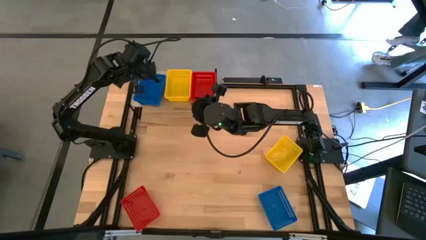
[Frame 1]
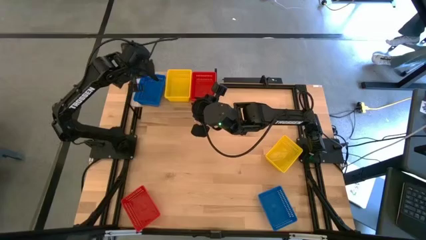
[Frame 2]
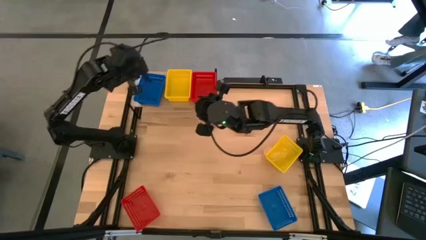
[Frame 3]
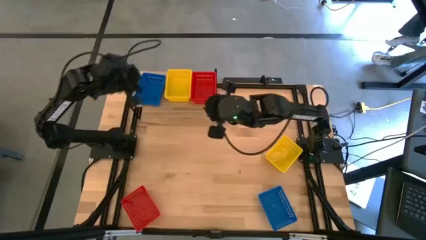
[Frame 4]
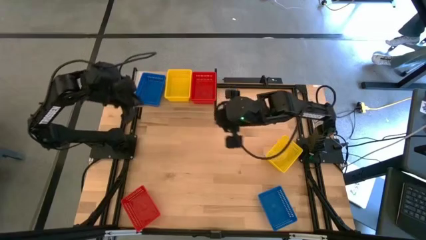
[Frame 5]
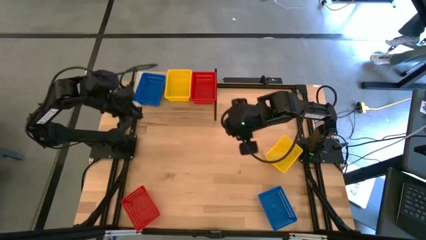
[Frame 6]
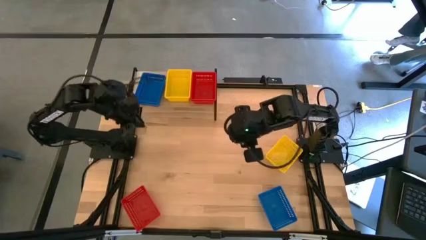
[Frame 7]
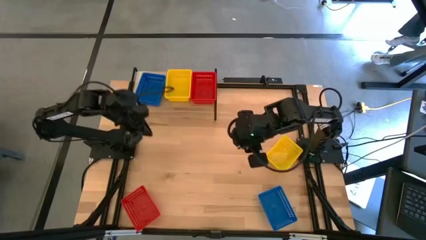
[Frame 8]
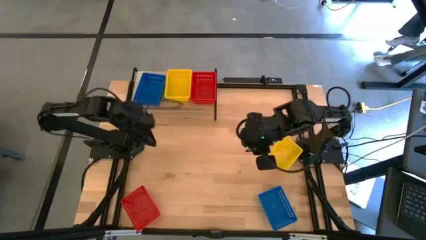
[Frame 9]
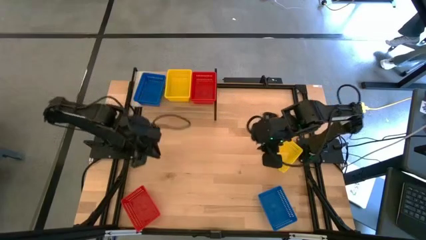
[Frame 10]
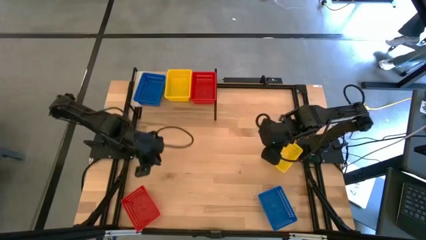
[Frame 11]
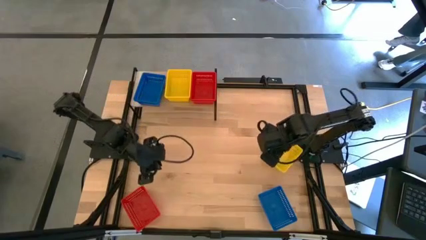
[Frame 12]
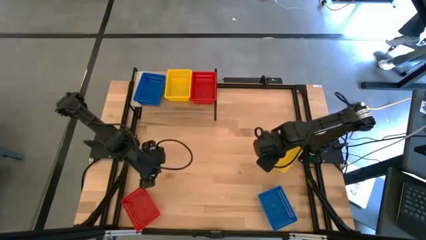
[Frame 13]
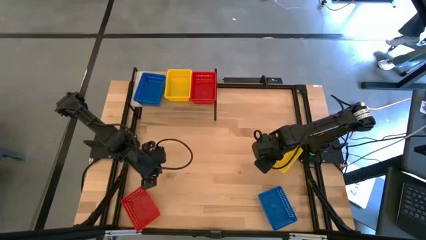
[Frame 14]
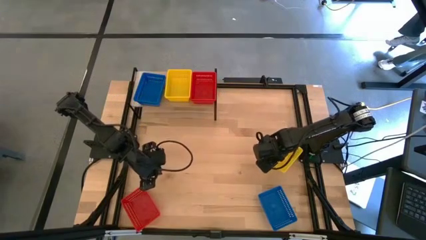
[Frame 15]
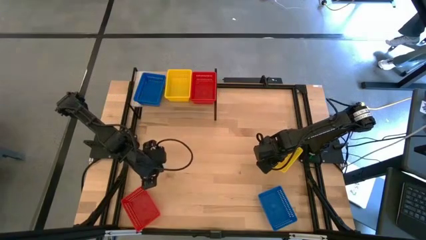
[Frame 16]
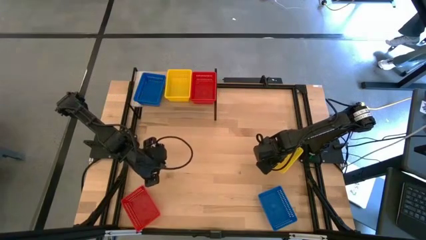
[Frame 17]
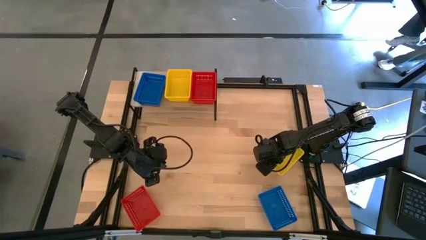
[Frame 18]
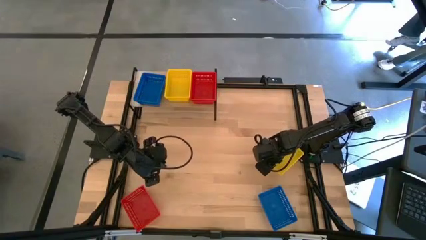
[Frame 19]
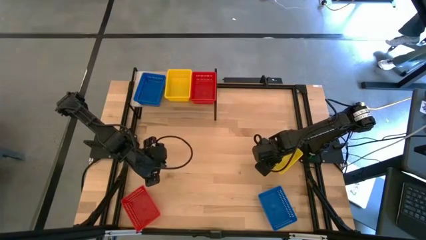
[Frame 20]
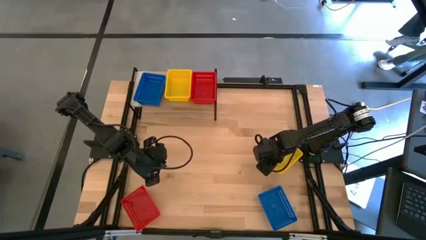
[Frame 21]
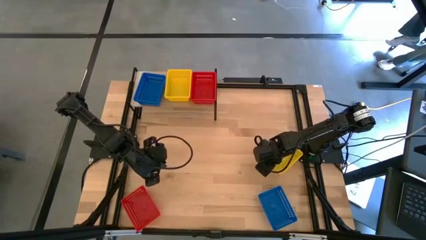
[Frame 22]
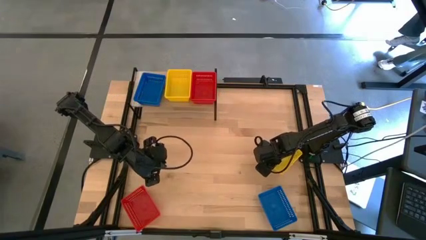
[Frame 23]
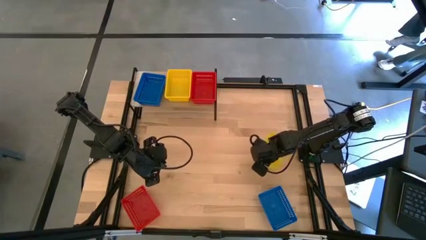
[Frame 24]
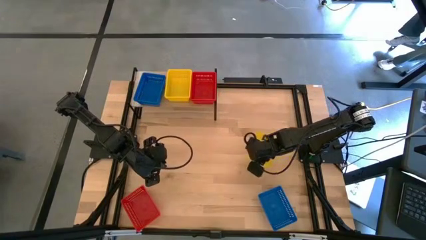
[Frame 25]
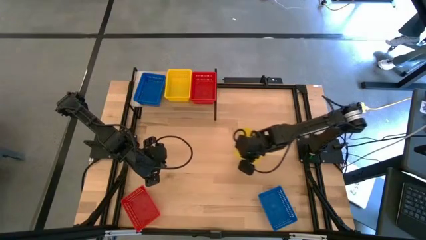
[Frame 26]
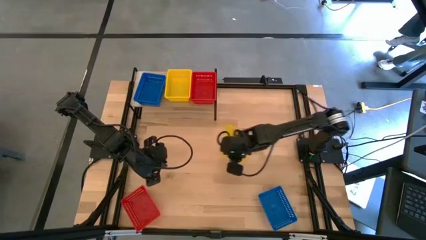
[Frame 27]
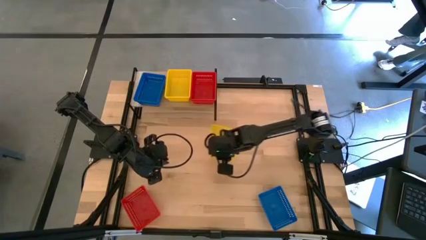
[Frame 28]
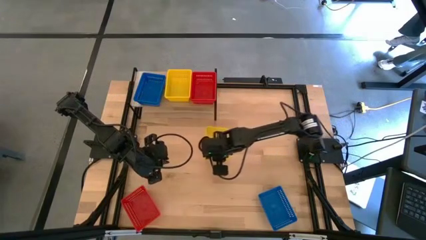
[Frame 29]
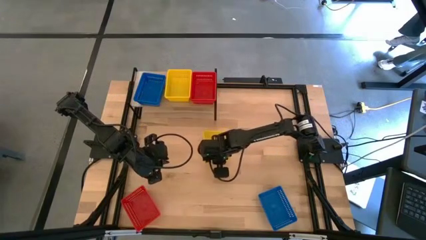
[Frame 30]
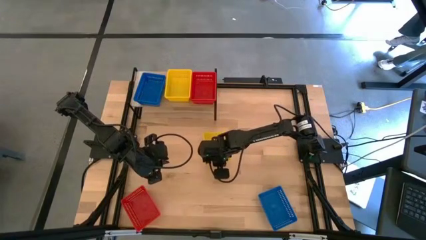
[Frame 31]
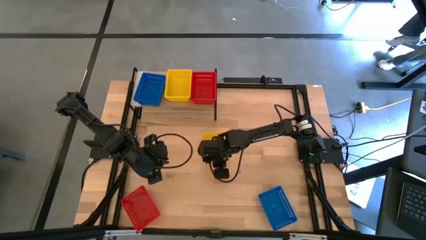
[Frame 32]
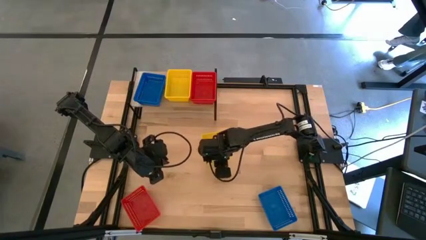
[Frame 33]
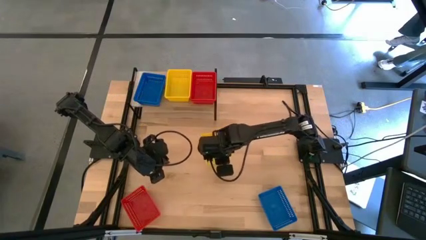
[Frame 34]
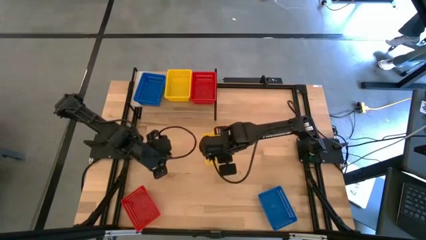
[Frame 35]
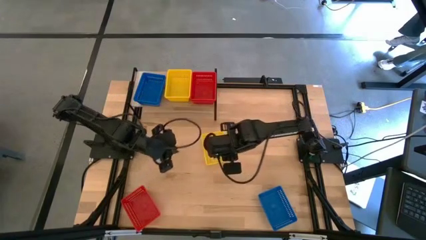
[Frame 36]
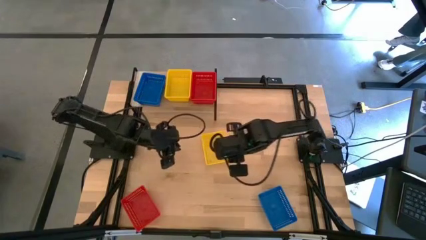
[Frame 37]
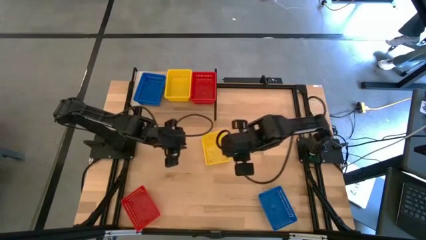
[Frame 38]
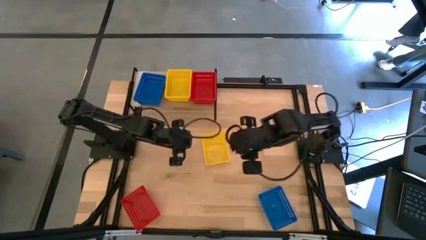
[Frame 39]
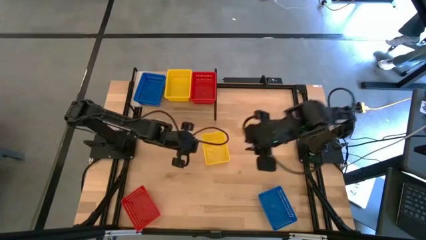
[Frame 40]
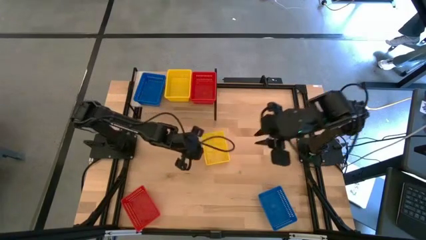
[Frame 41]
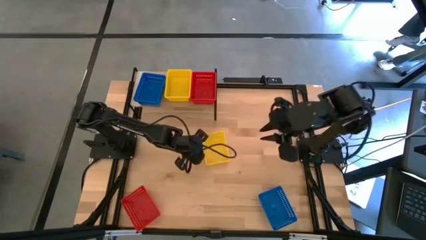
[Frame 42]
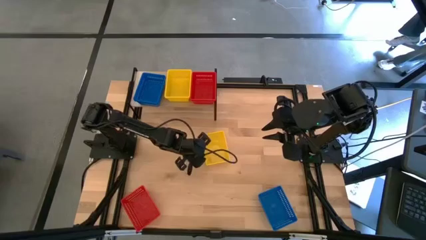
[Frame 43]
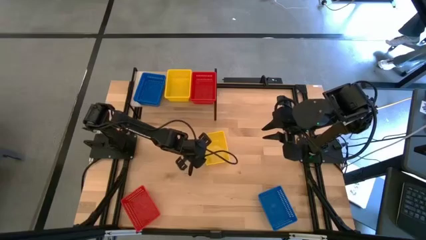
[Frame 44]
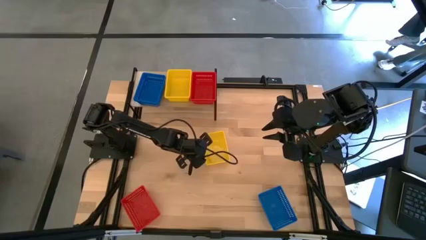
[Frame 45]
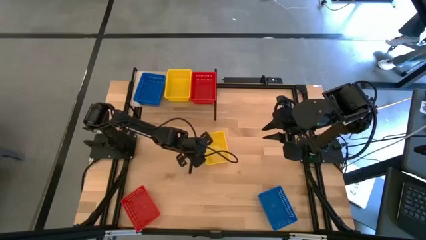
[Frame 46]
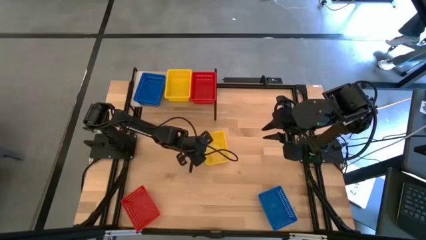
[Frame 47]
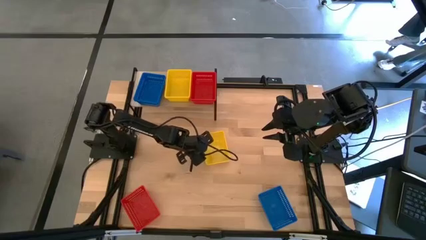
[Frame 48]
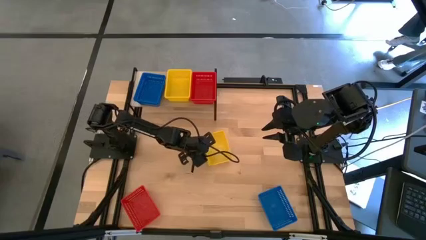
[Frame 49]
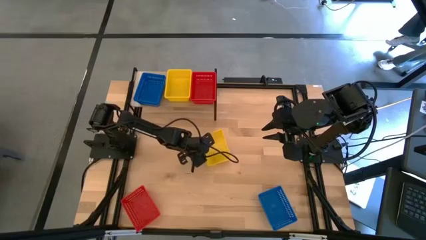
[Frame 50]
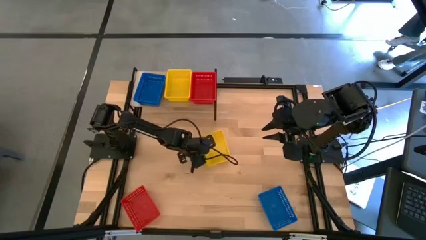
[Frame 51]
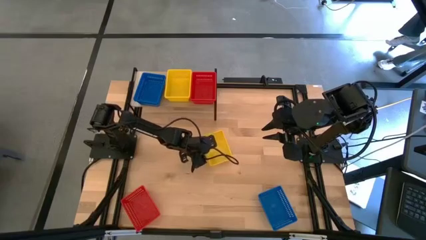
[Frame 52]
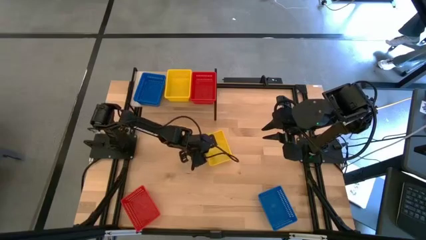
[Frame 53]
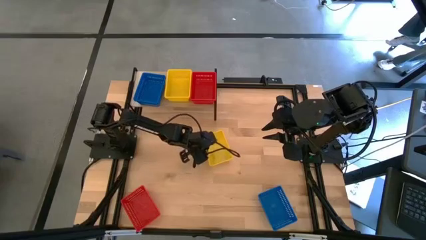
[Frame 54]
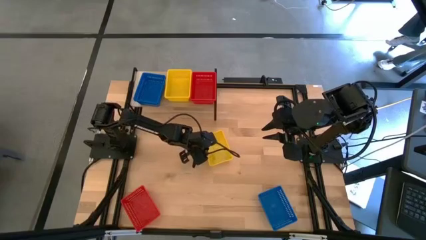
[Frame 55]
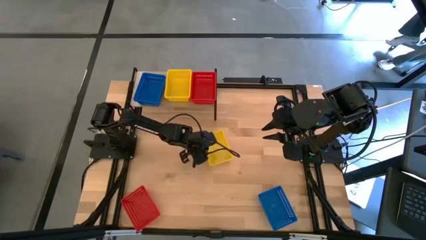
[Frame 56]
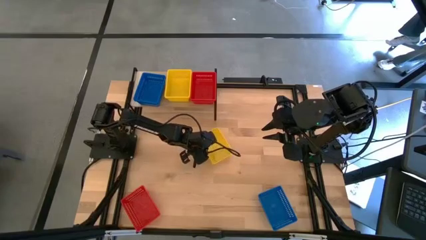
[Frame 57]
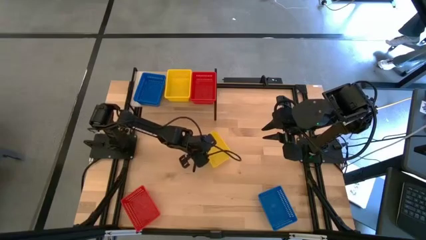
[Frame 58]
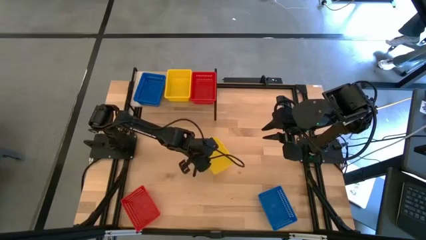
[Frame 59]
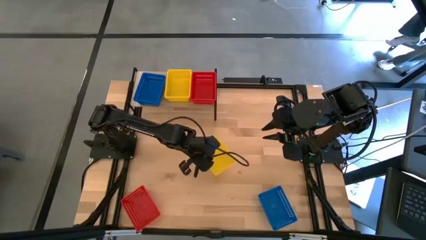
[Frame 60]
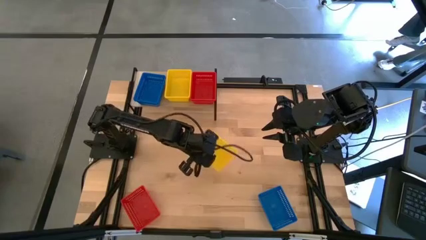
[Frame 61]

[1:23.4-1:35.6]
Task: Stack baskets on shelf by color
Stack the yellow bin on top of the yellow bins on the shelf
